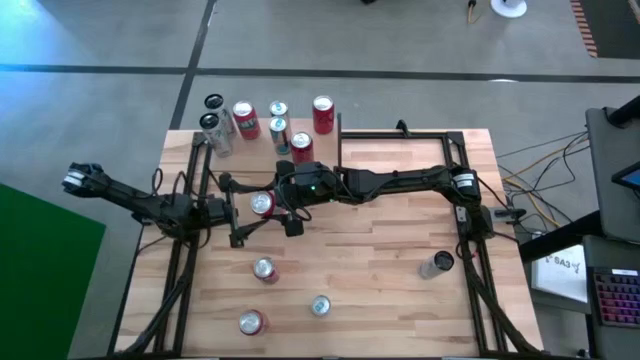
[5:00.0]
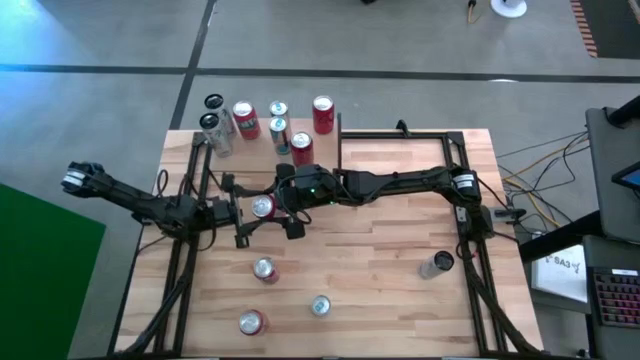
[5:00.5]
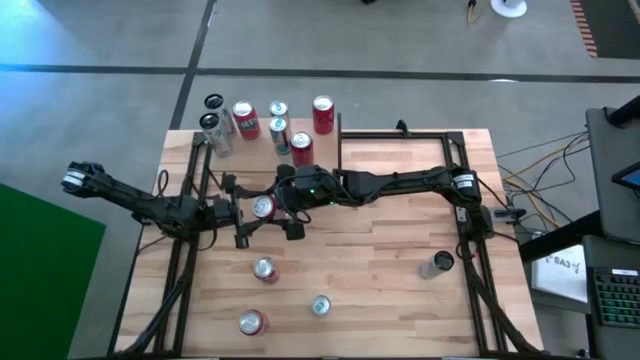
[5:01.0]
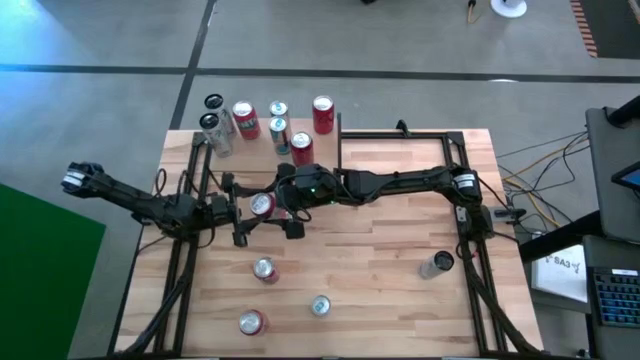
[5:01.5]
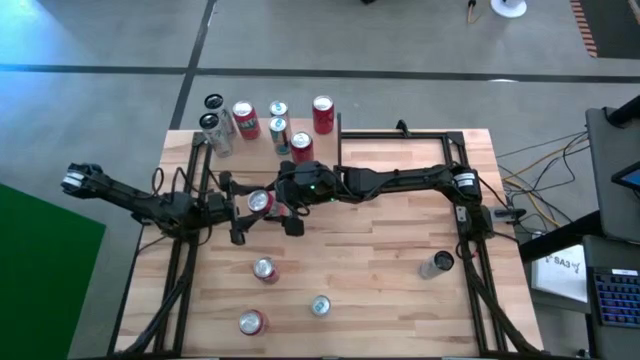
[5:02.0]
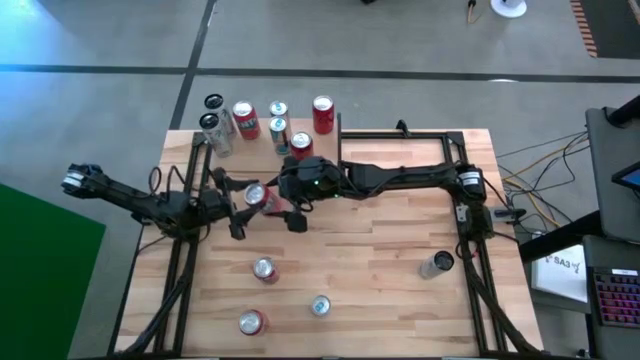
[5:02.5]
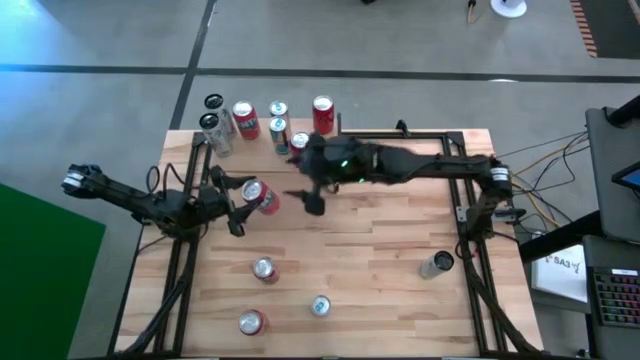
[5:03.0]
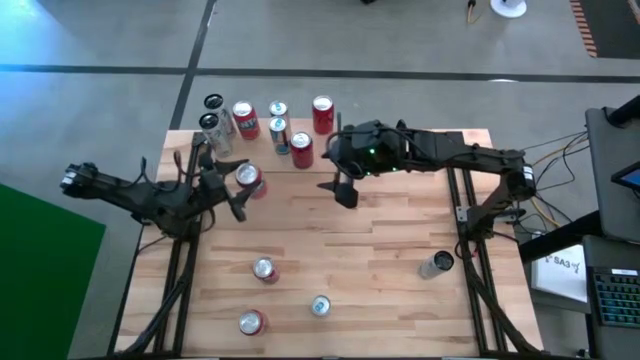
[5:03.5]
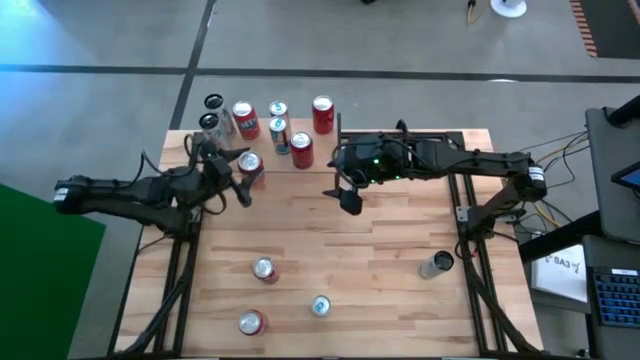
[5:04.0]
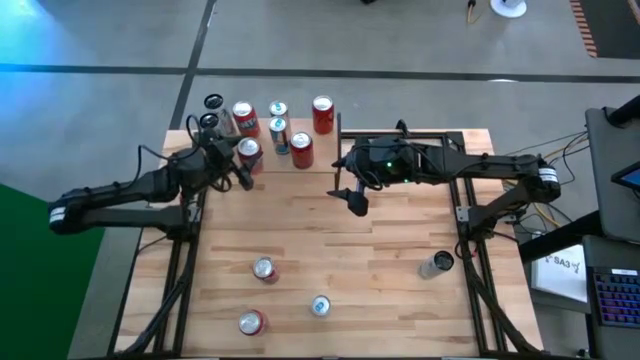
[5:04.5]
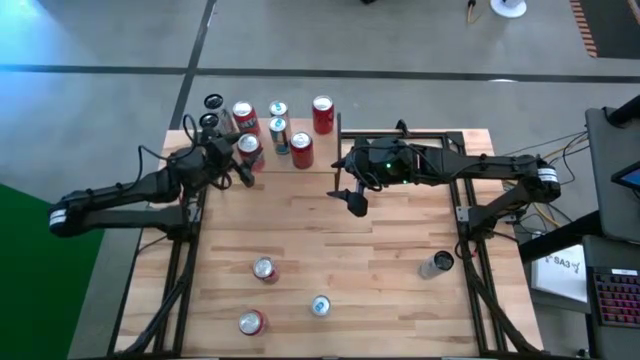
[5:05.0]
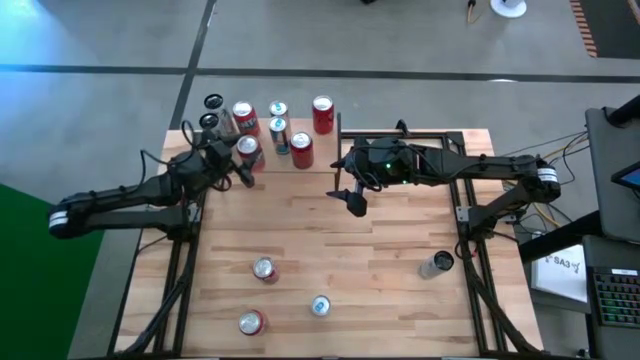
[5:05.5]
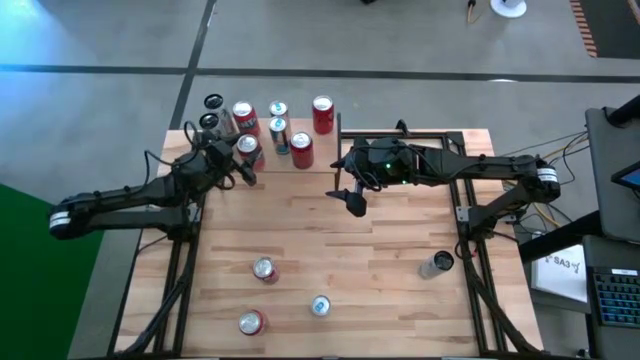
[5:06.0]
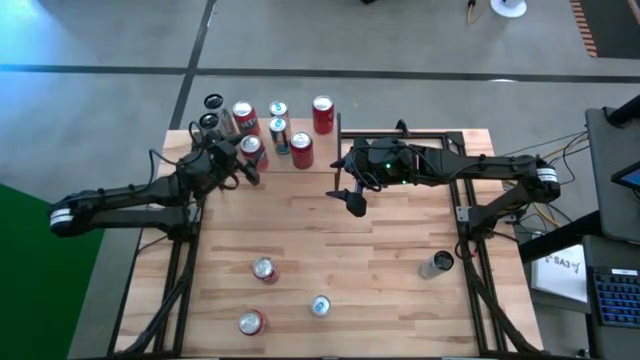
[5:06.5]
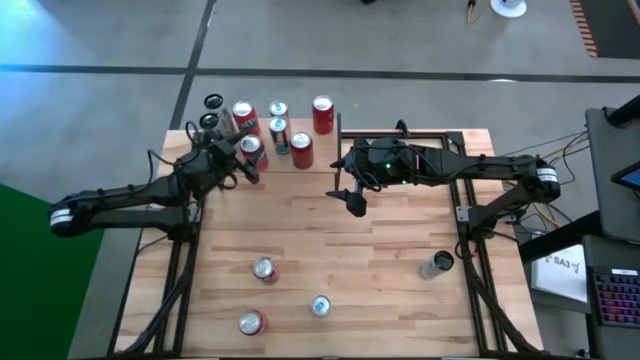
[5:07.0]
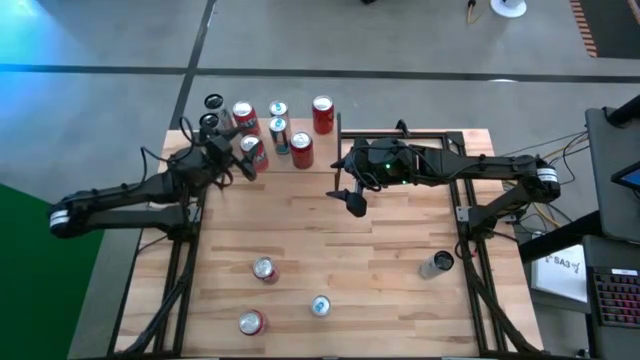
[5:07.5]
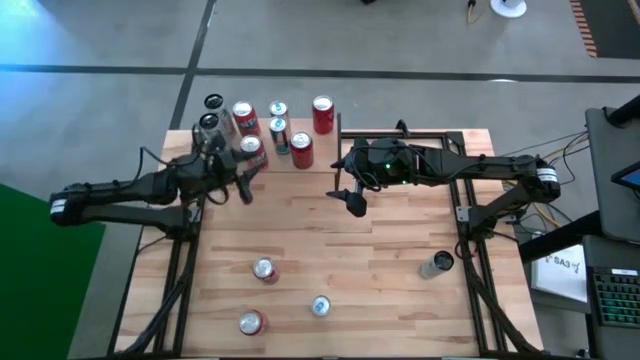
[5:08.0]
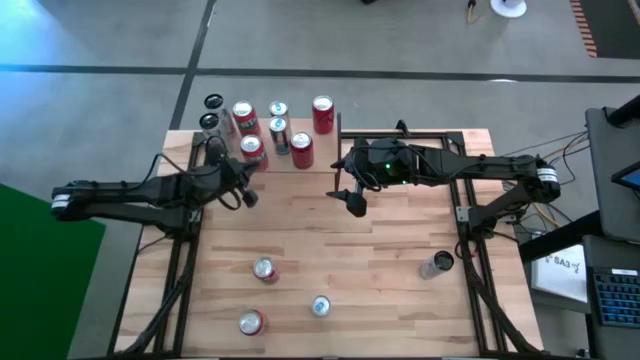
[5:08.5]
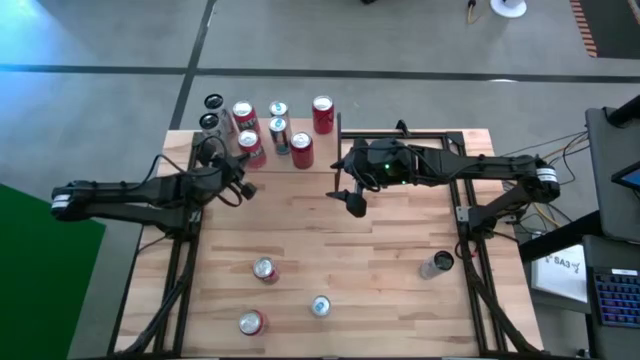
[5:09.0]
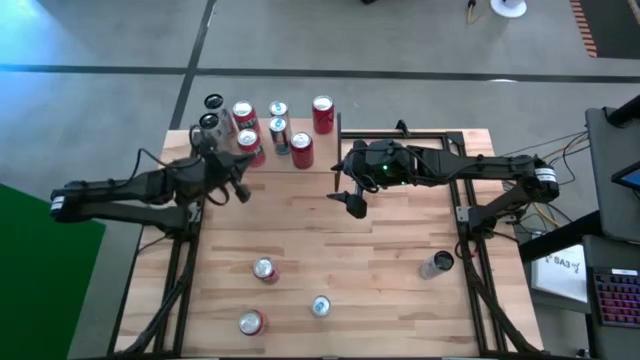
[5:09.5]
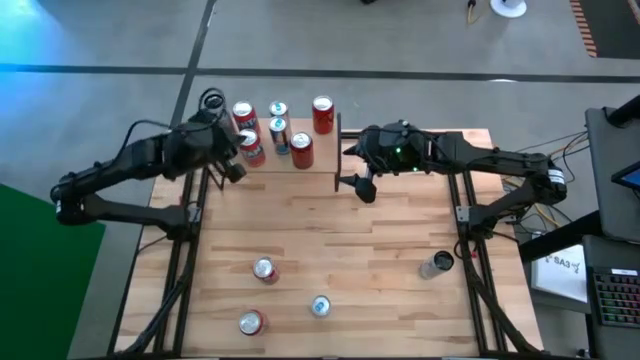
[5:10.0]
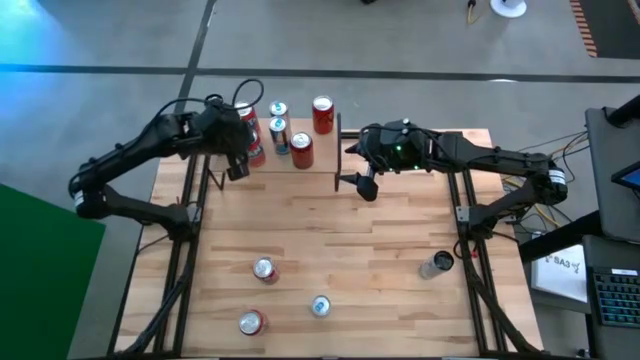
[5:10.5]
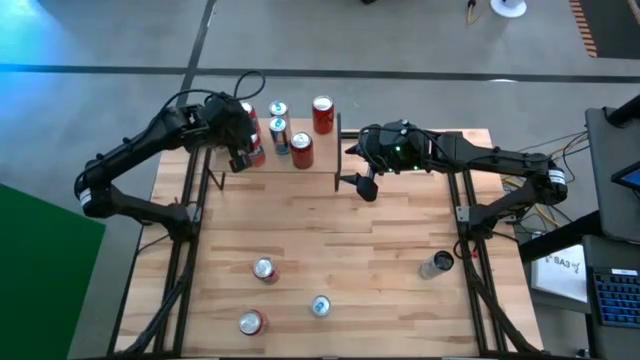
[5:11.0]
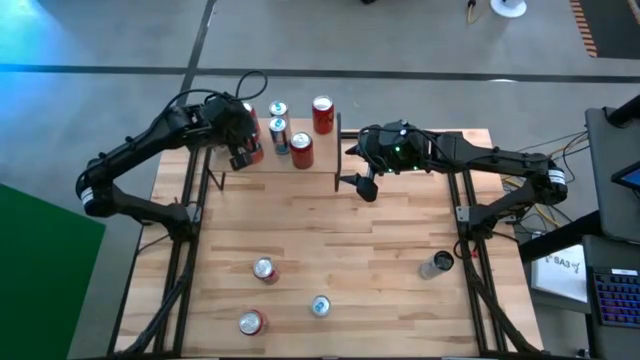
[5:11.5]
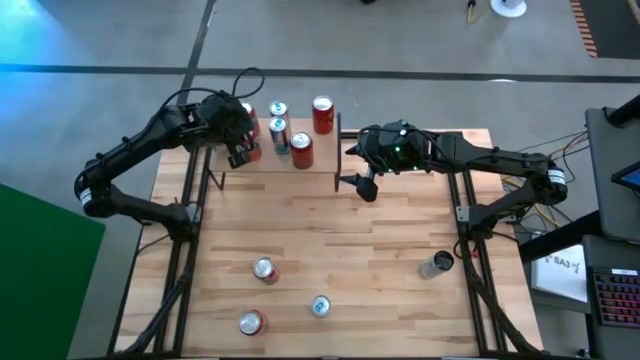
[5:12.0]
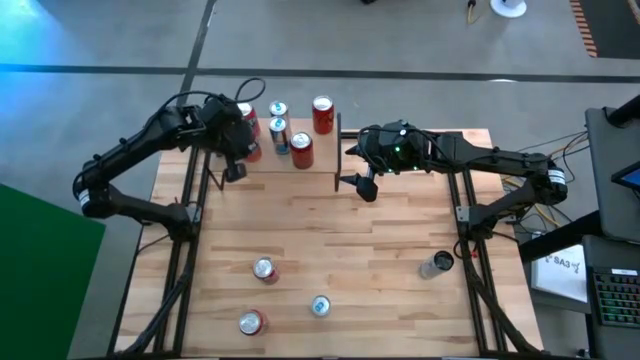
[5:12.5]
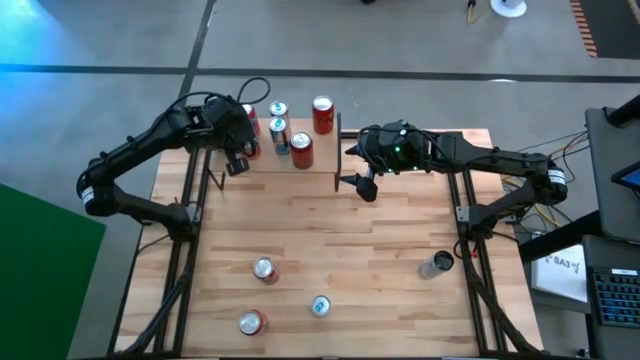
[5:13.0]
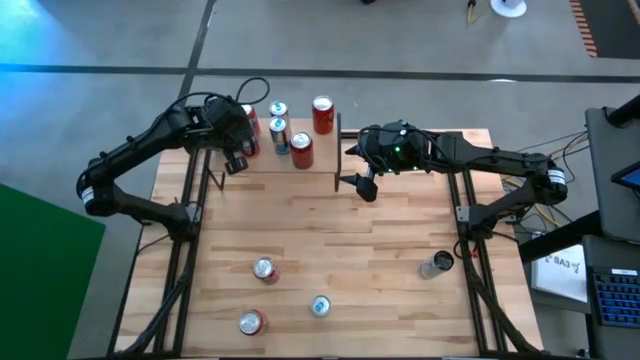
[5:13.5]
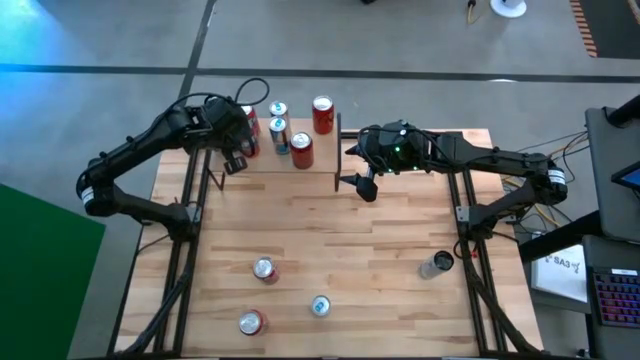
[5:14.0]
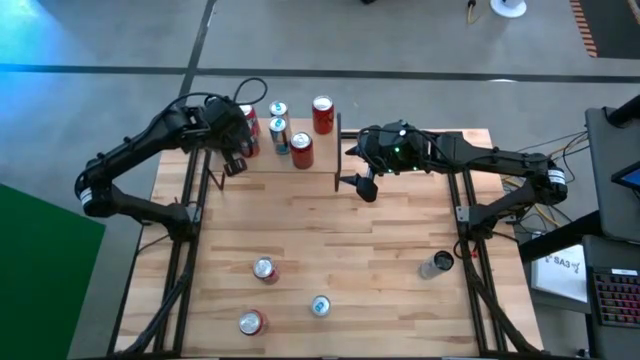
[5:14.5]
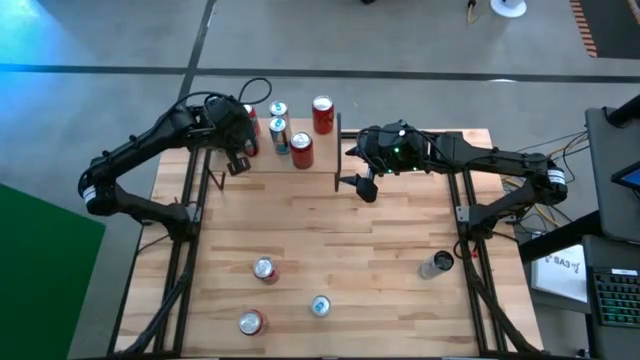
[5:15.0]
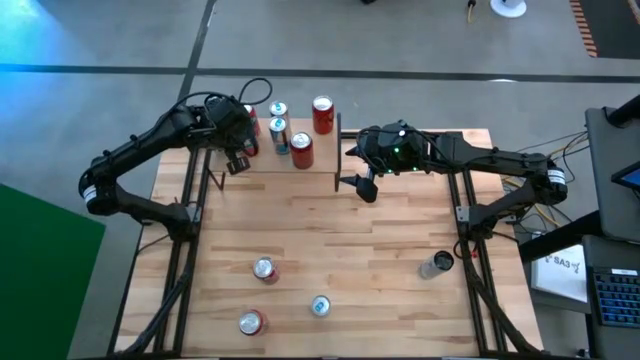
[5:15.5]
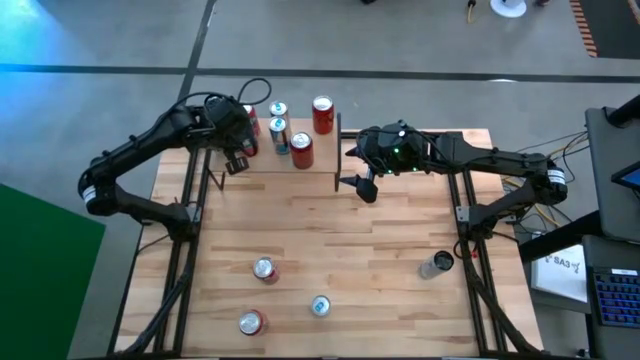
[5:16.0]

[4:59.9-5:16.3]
Task: Place canned beverage on shelf
Put the red soda can on the shelf aligned with the other red soda cans

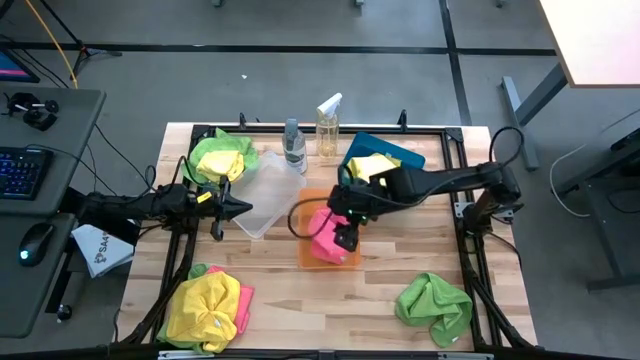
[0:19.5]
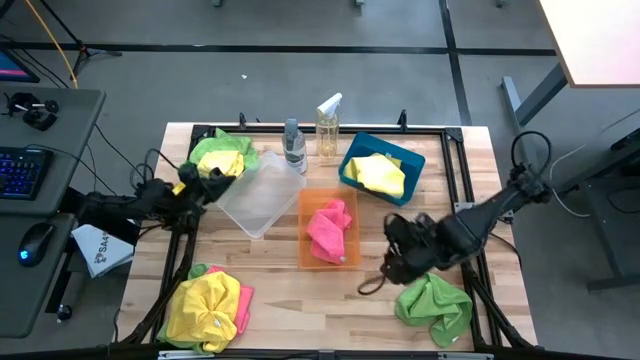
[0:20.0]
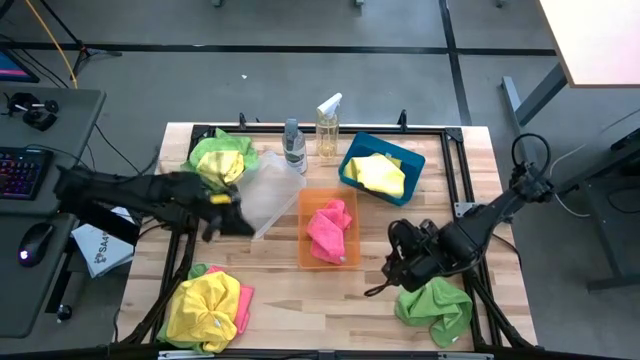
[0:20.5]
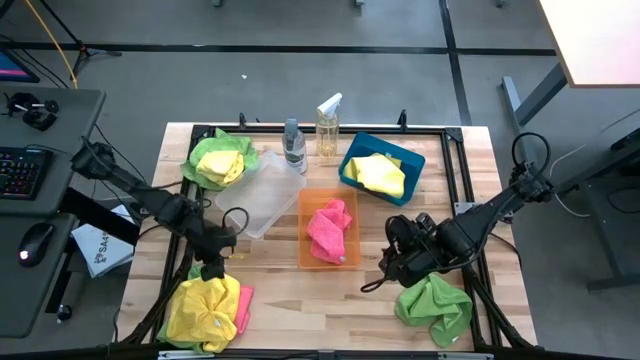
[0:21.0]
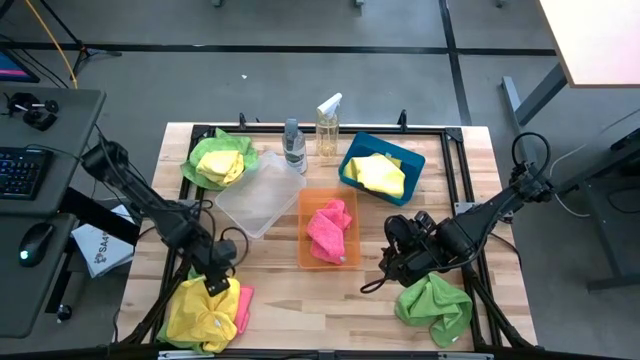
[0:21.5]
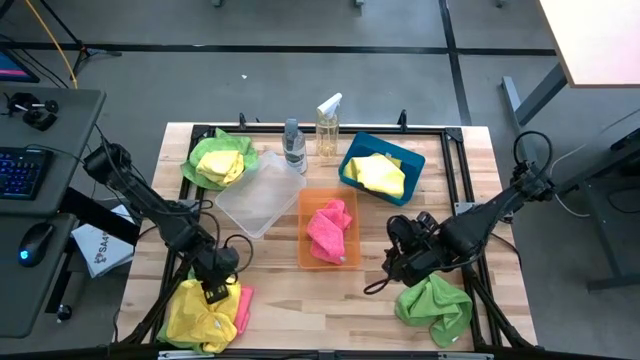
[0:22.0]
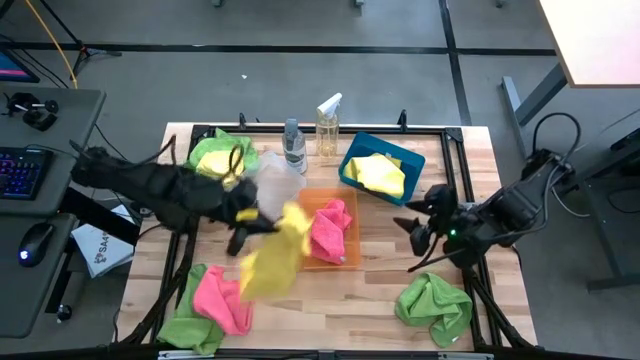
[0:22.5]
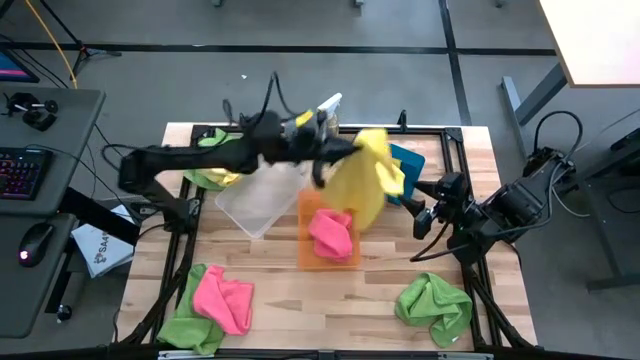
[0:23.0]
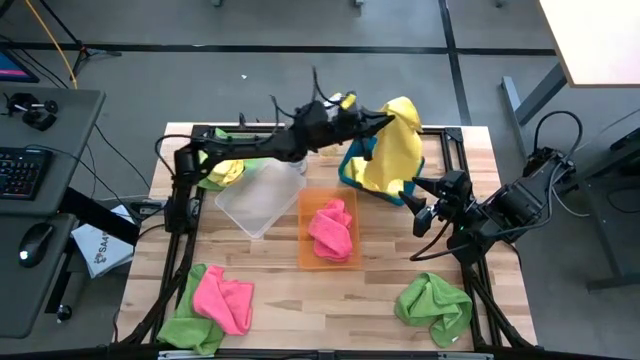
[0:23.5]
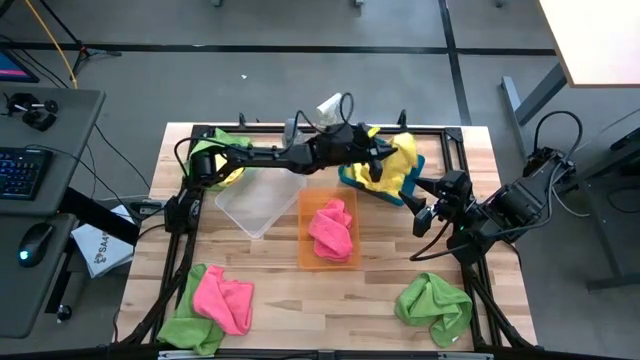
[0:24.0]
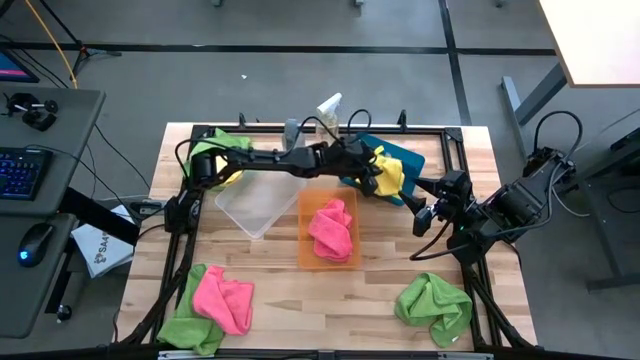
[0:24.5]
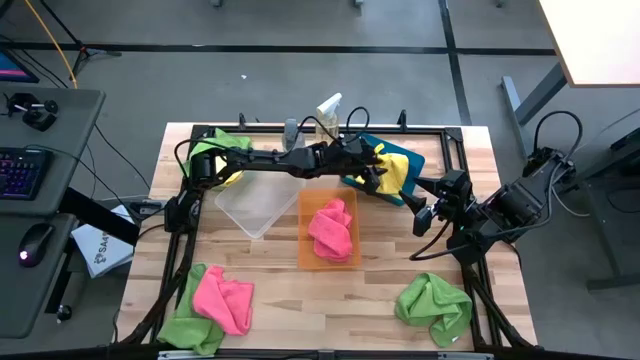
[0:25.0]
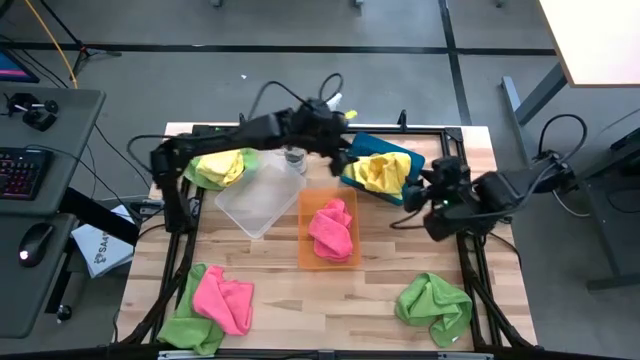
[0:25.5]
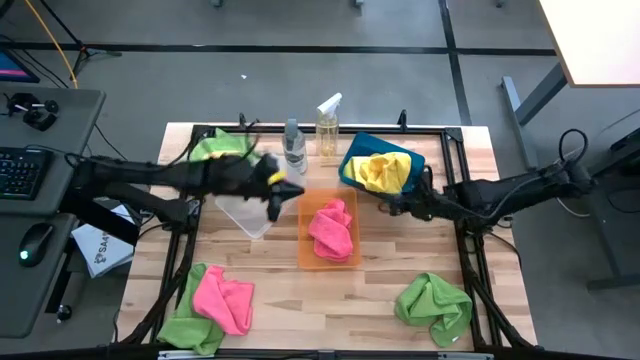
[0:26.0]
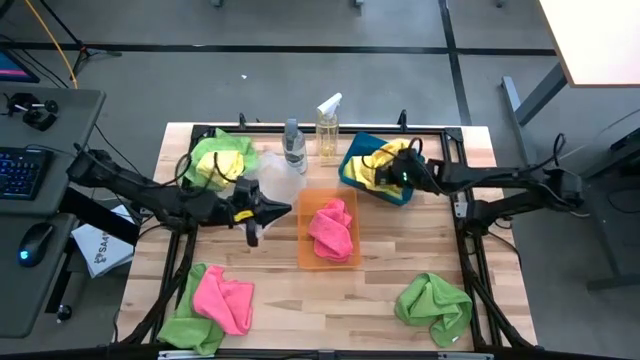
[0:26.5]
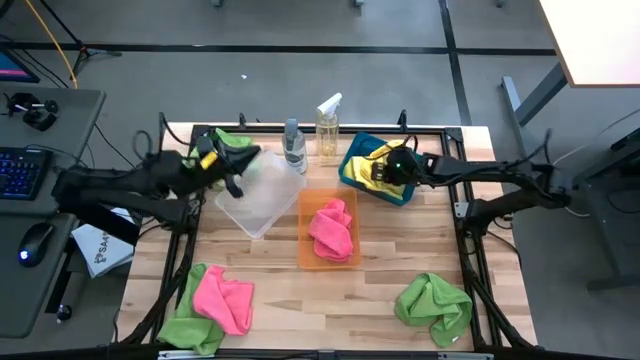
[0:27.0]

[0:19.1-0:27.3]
Task: Sort microfiber towel by color & place in baskets
Put the bottom yellow towel into the blue bin
